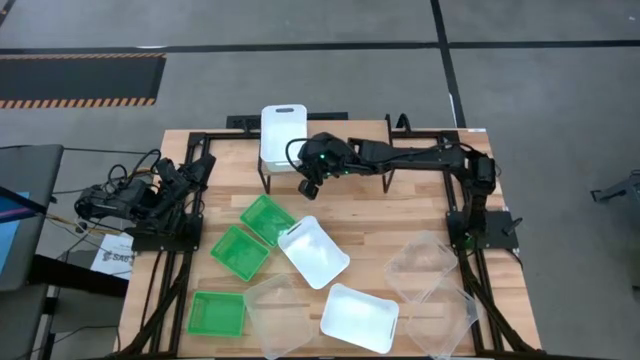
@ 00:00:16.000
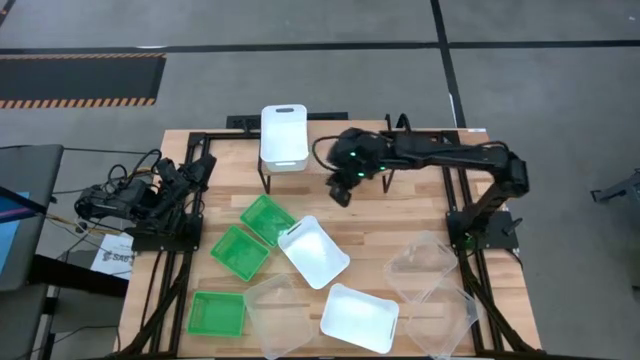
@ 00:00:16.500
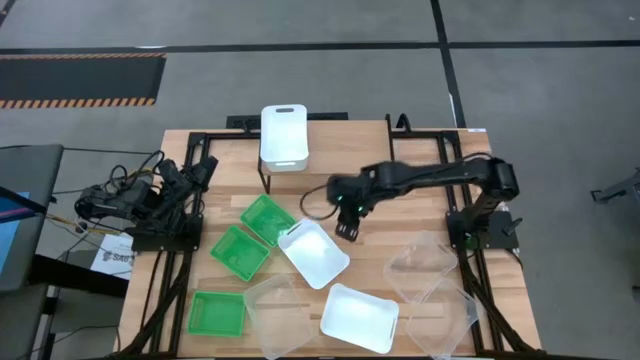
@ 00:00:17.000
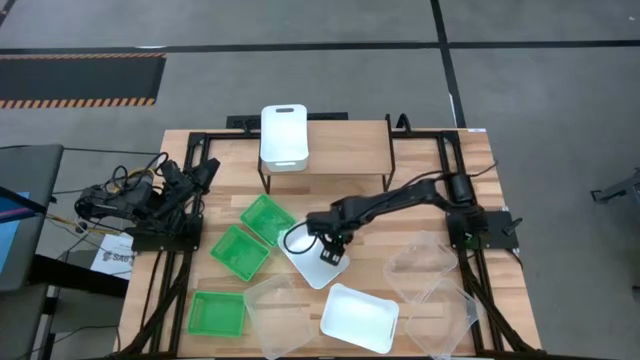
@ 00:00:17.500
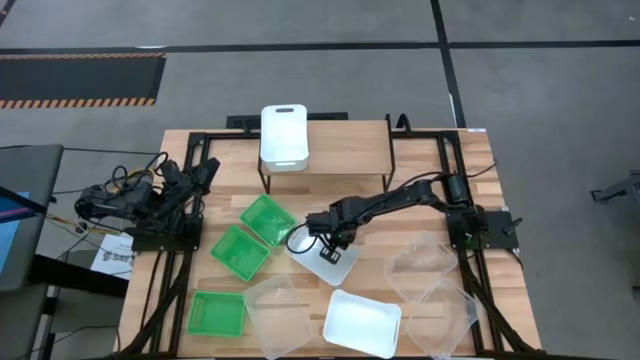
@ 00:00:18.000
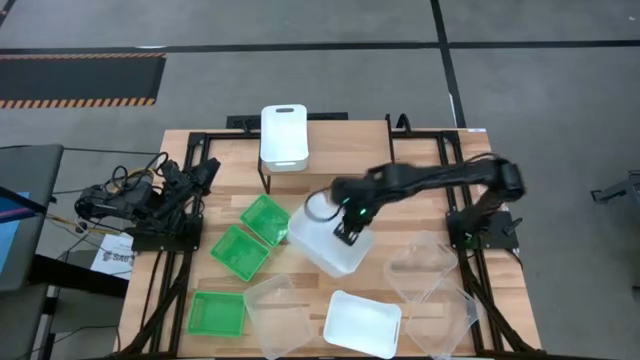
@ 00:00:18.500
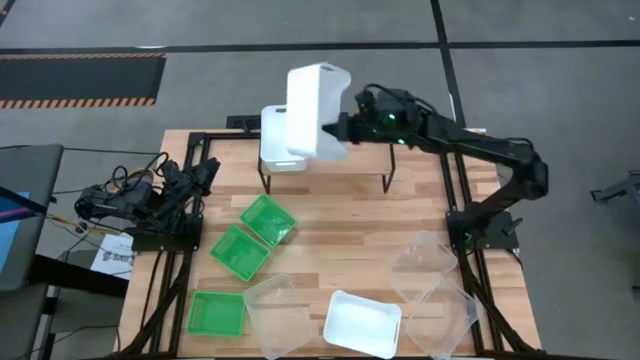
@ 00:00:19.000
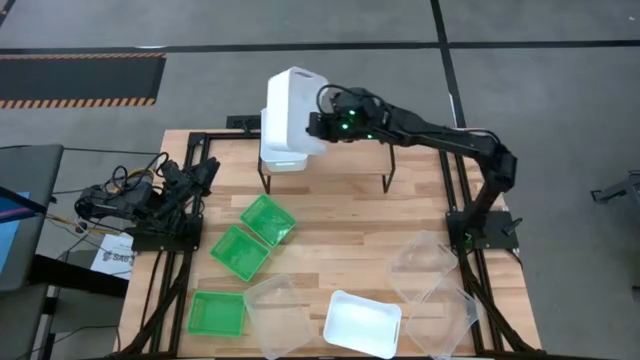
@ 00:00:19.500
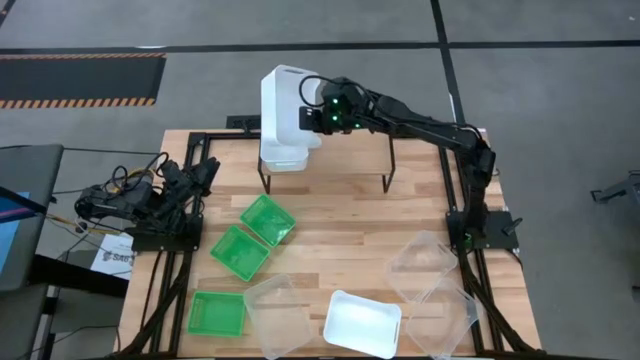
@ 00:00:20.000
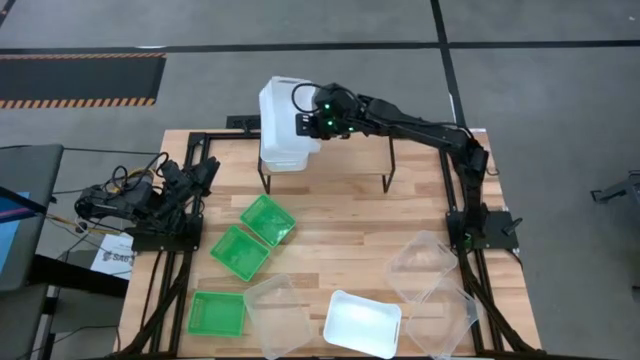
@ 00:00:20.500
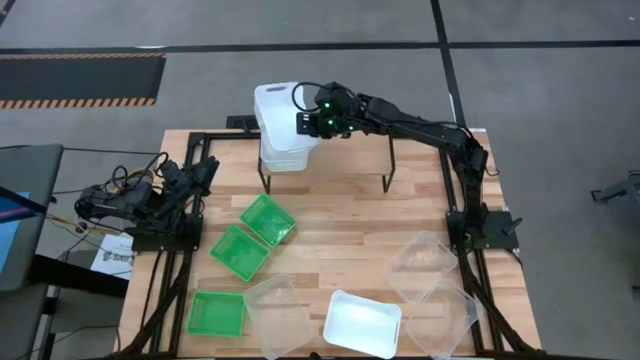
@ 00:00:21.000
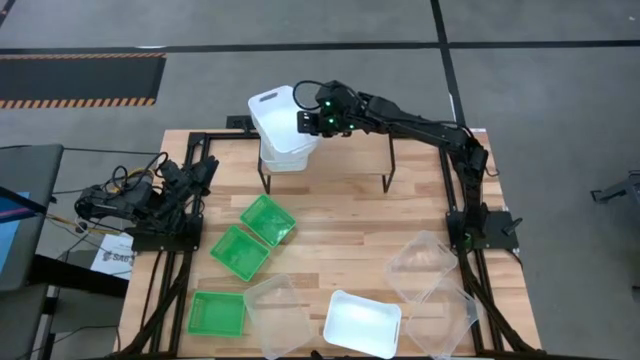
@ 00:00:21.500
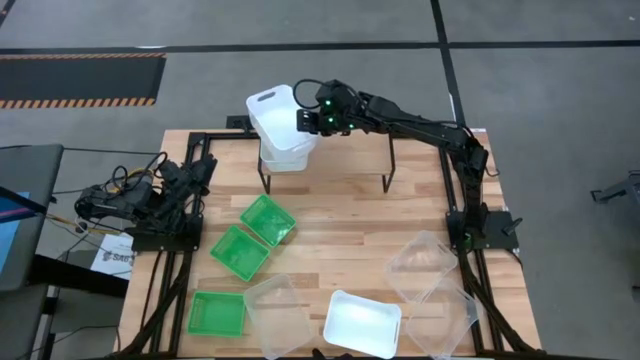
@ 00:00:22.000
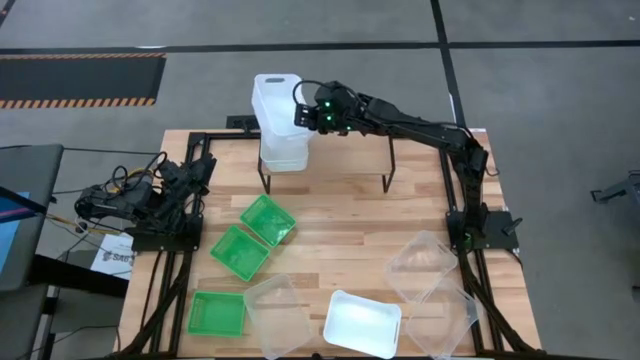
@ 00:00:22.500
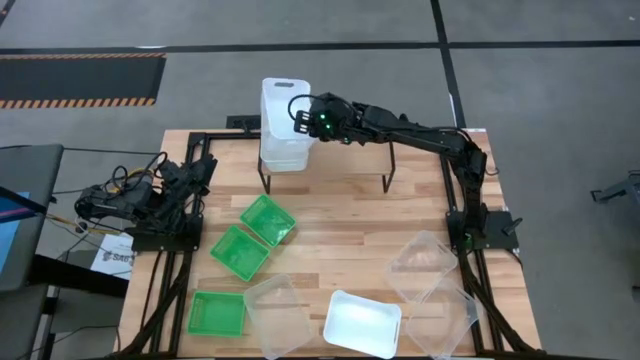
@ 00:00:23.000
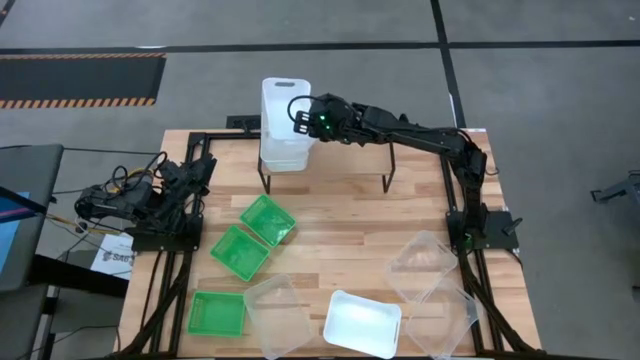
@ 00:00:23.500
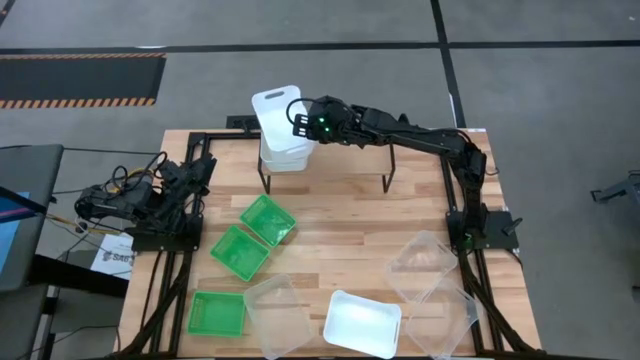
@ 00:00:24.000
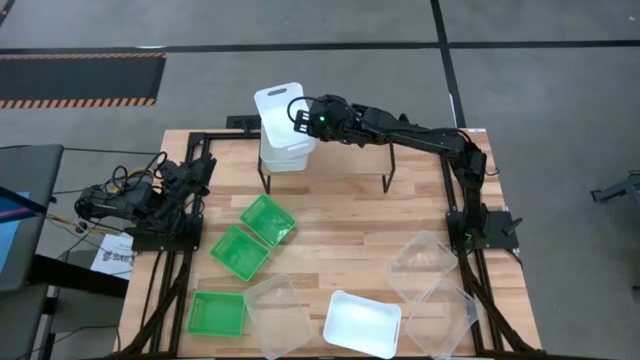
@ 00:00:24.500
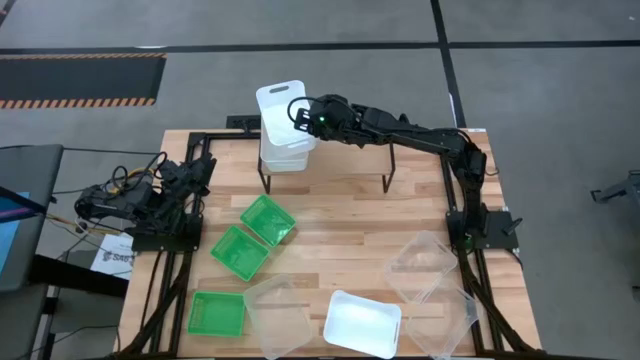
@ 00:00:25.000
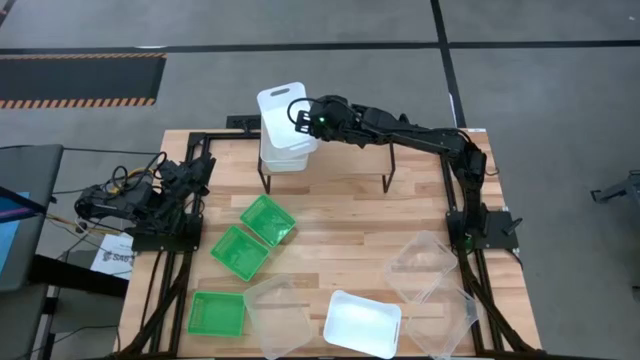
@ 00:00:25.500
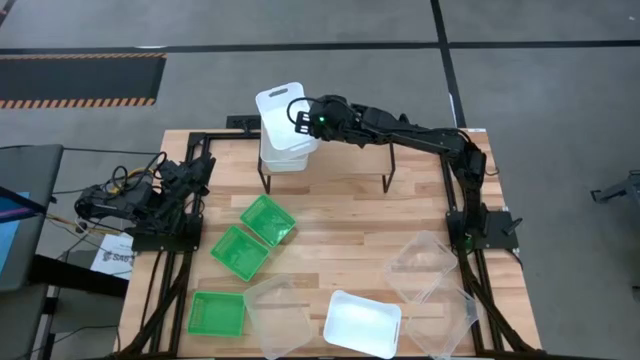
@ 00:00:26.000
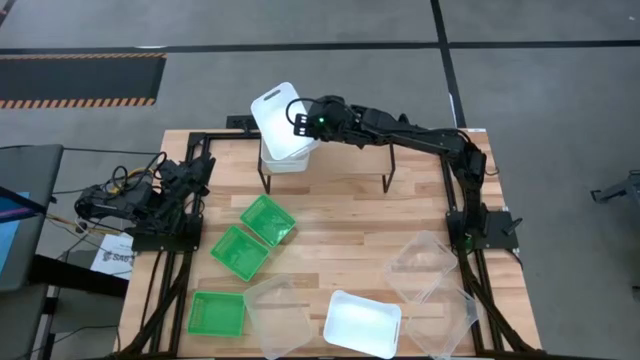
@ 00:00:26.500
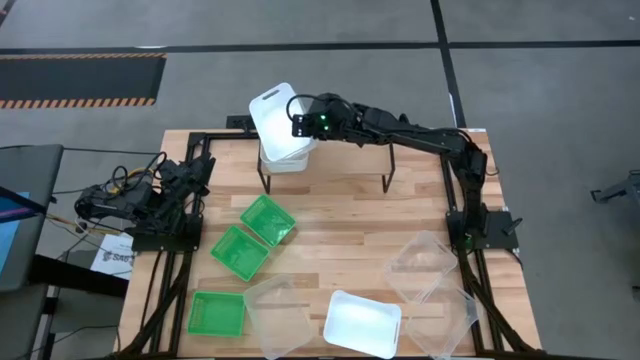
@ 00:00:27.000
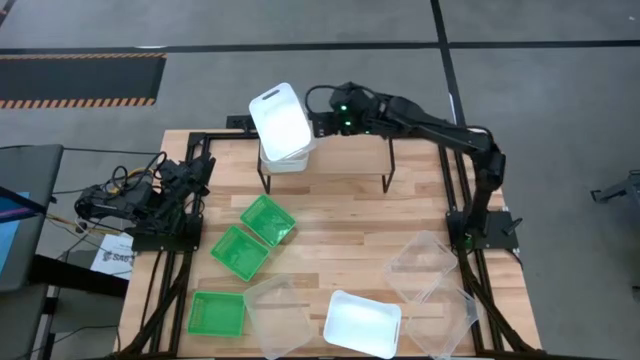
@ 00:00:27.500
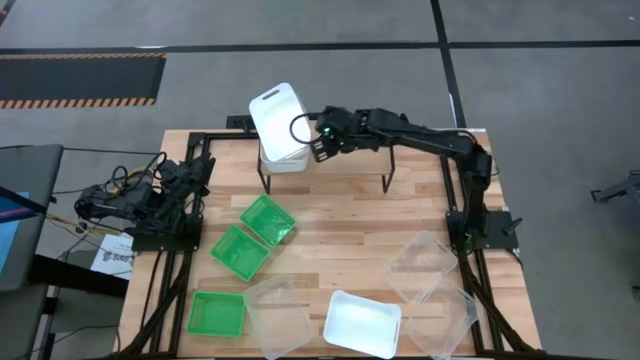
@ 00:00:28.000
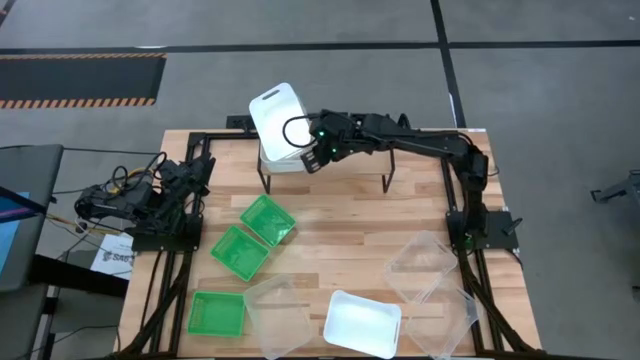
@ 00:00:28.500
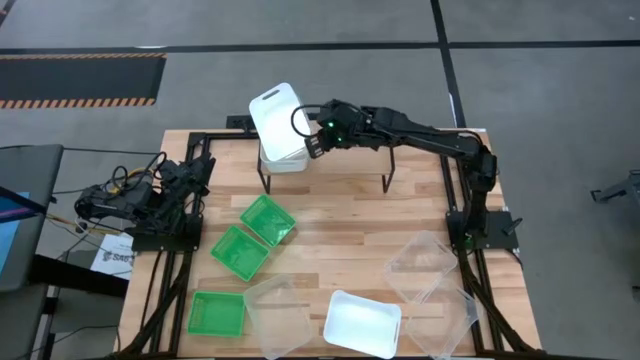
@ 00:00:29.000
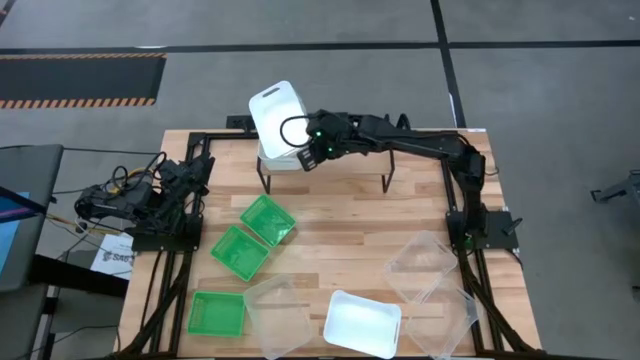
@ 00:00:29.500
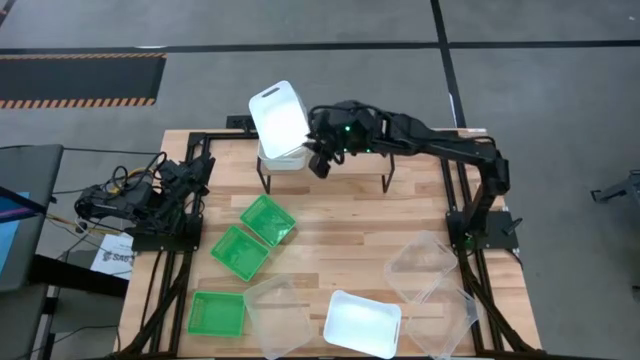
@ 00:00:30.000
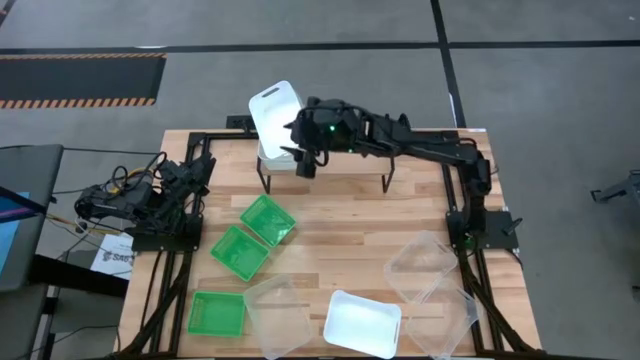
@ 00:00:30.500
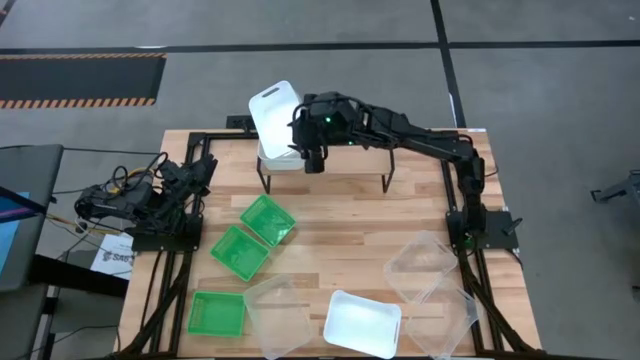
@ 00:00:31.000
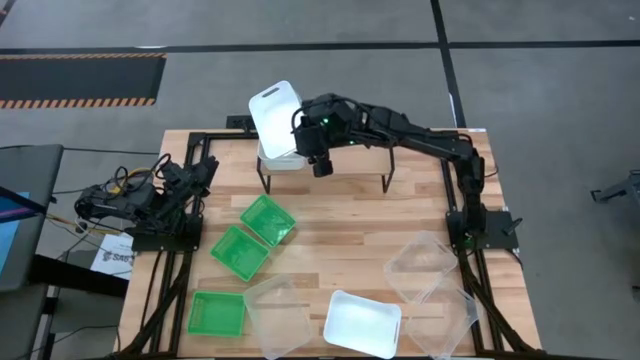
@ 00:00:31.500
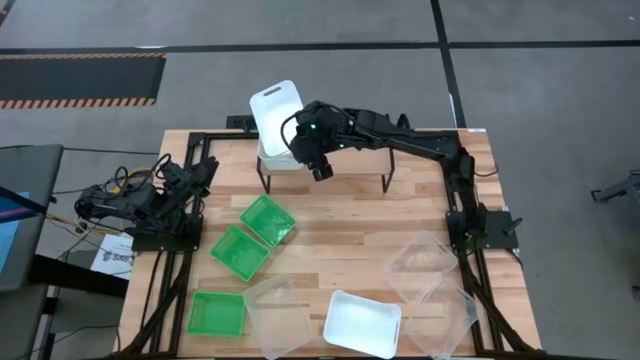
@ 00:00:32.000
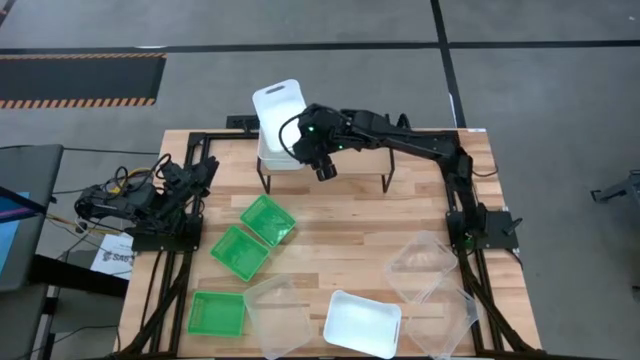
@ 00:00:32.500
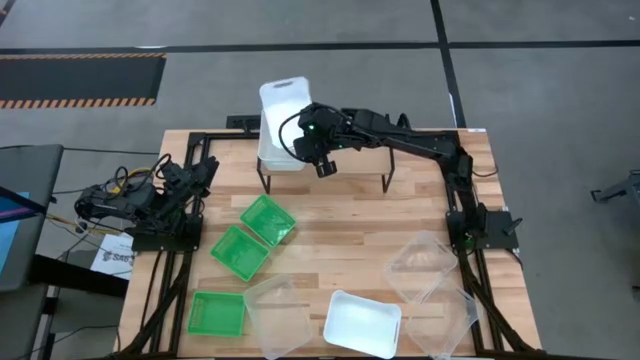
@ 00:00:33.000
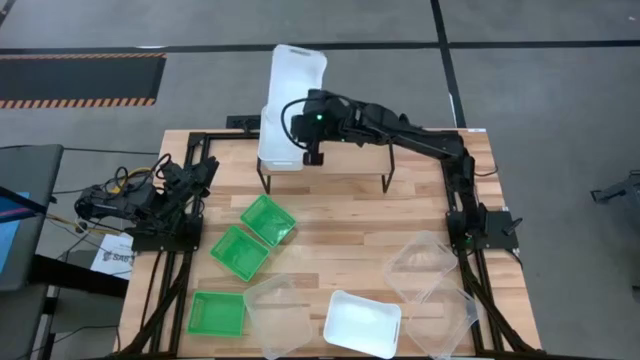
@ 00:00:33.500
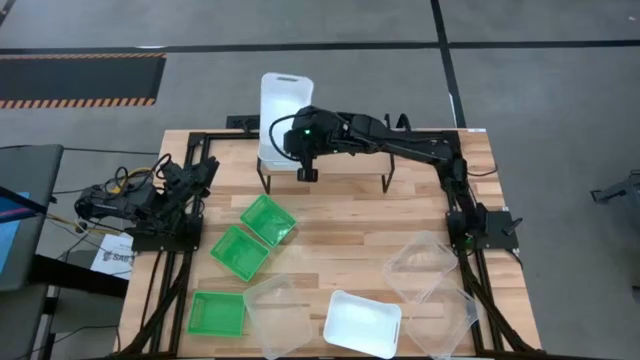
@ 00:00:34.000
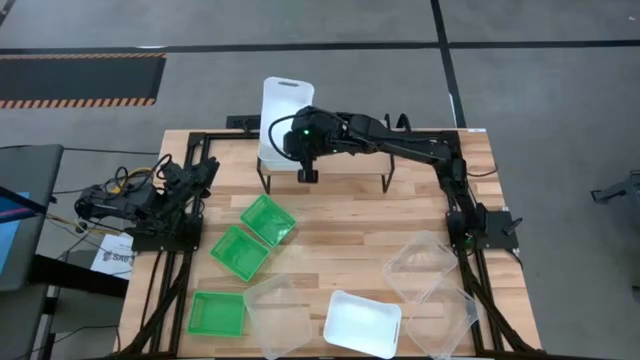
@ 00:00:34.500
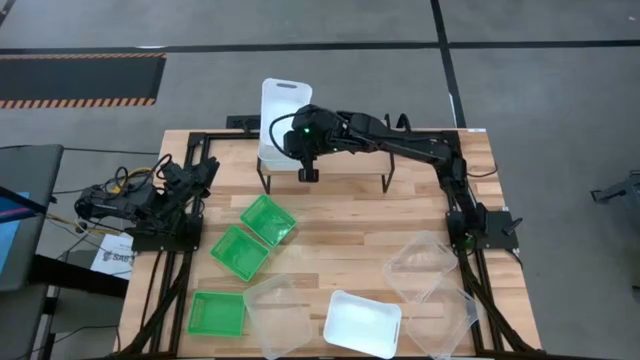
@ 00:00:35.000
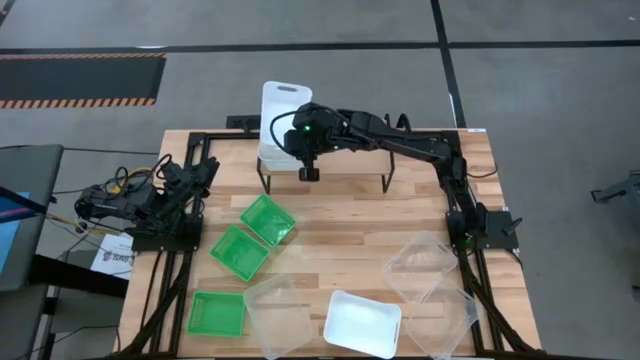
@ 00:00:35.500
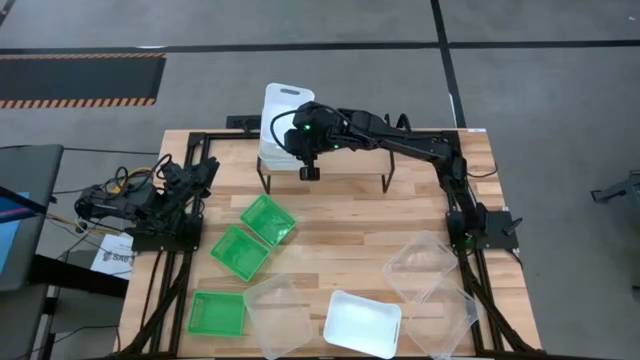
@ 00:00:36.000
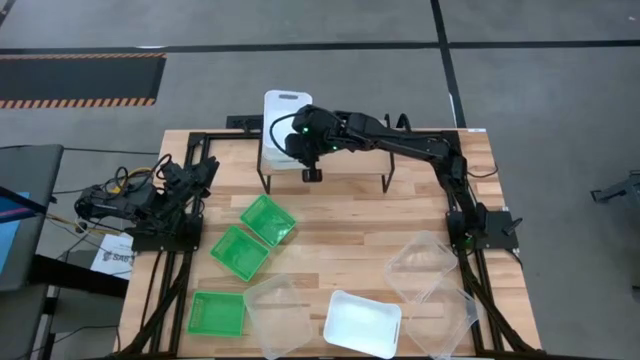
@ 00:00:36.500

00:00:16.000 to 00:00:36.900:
Task: Stack baskets on shelf by color
Stack the top white bin on the white bin on the shelf
